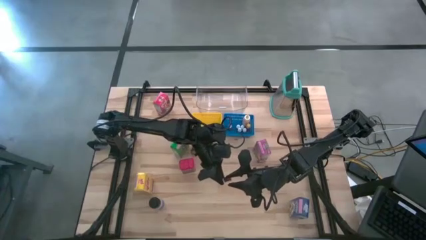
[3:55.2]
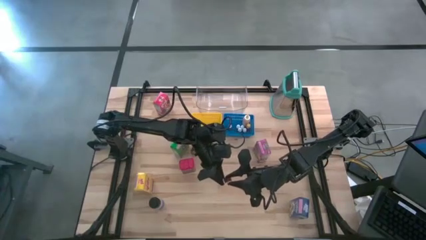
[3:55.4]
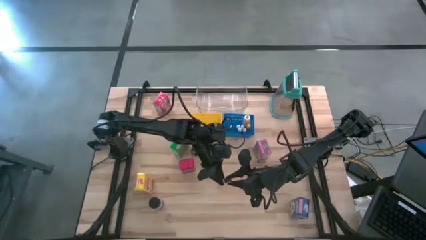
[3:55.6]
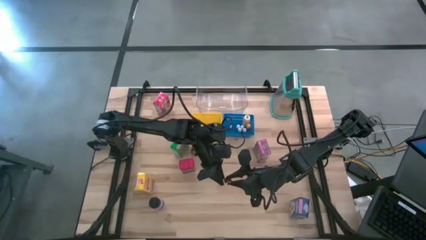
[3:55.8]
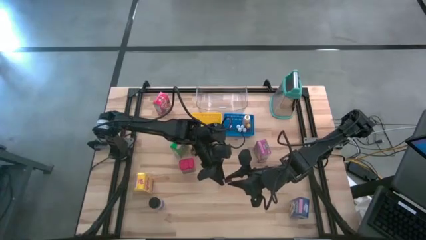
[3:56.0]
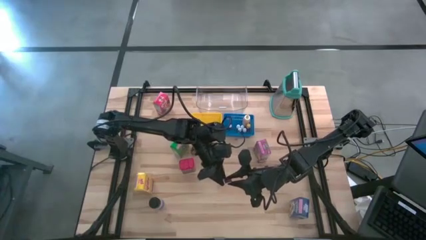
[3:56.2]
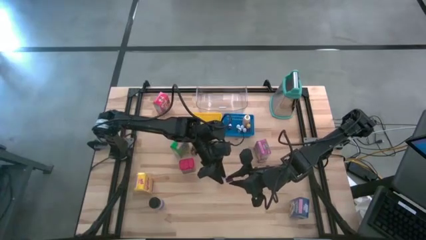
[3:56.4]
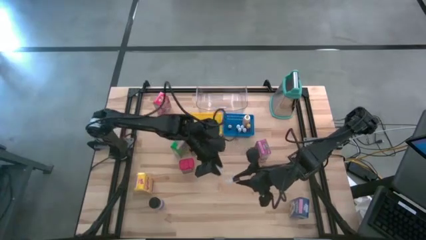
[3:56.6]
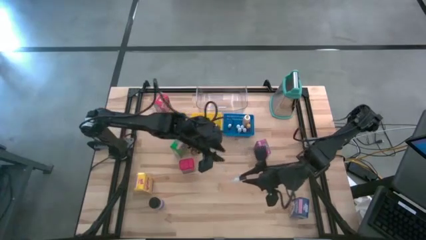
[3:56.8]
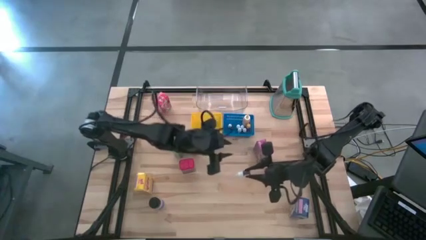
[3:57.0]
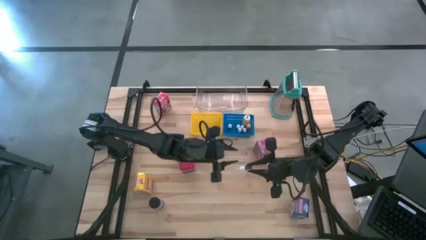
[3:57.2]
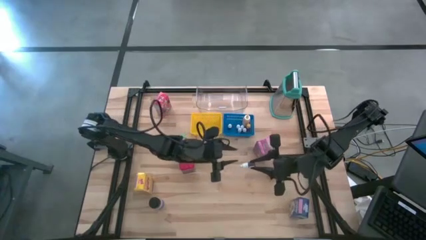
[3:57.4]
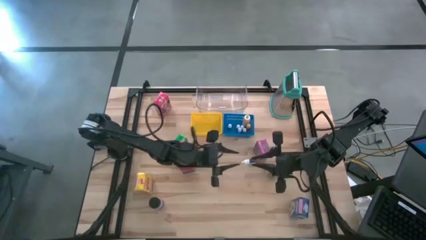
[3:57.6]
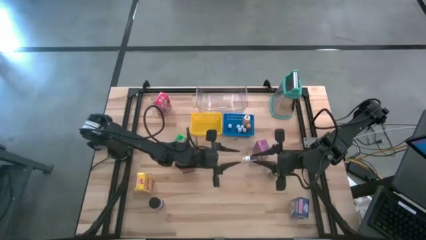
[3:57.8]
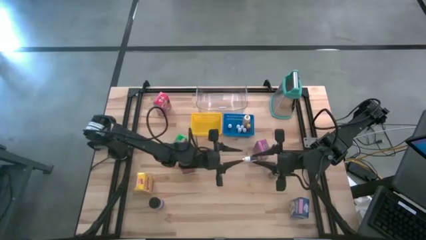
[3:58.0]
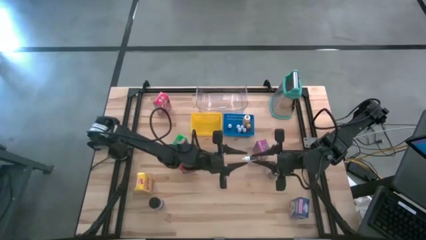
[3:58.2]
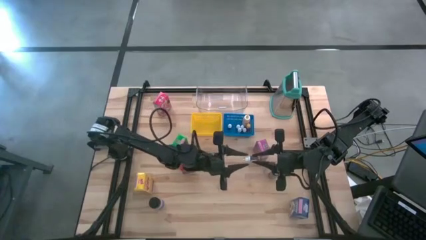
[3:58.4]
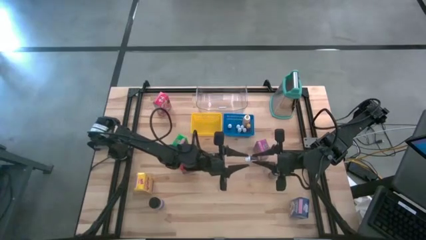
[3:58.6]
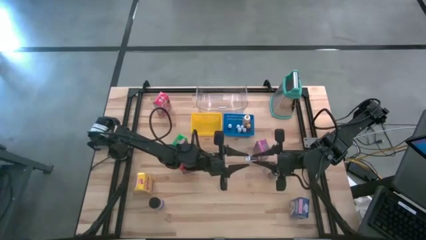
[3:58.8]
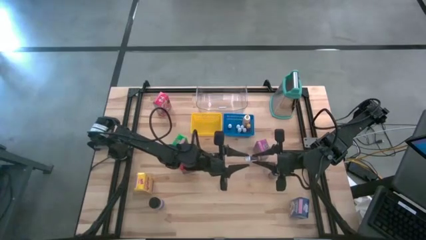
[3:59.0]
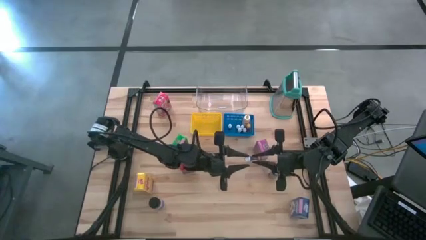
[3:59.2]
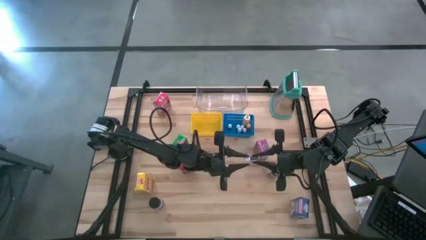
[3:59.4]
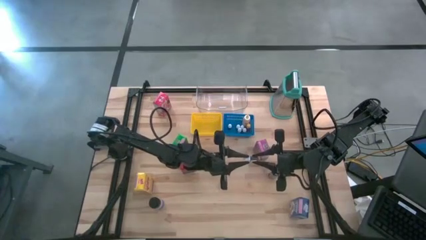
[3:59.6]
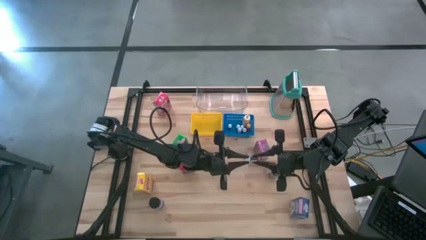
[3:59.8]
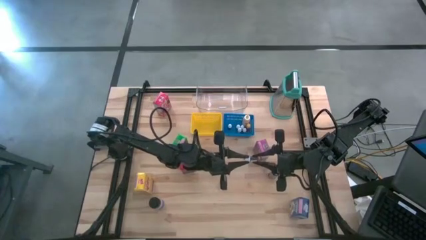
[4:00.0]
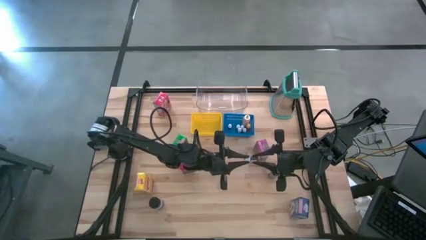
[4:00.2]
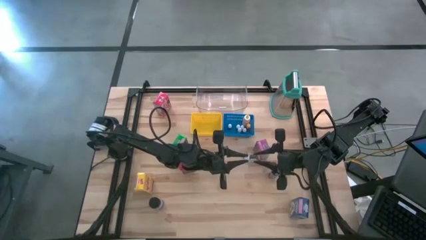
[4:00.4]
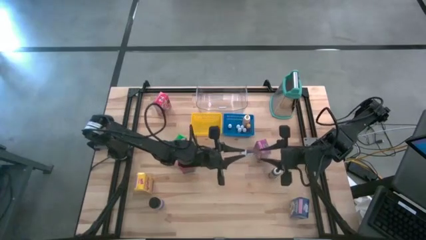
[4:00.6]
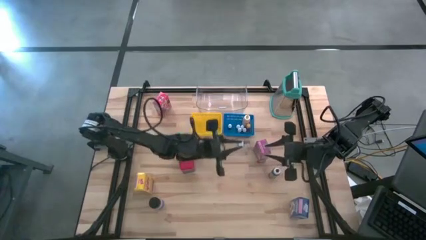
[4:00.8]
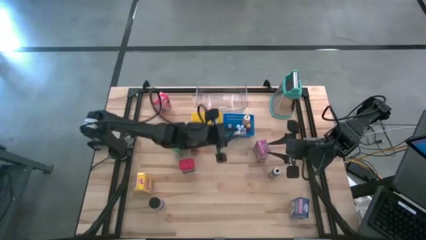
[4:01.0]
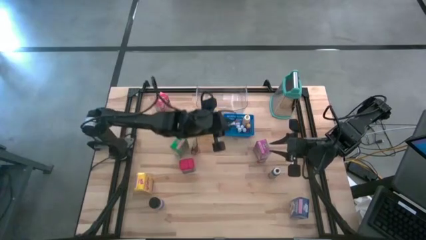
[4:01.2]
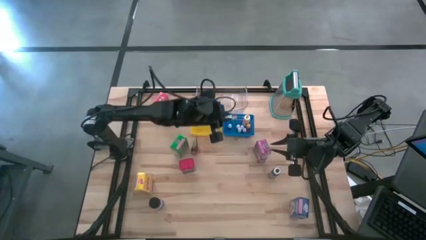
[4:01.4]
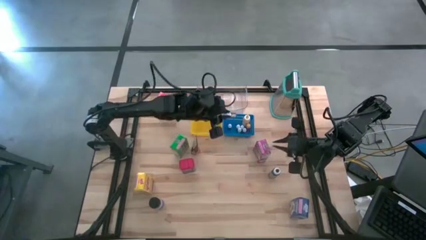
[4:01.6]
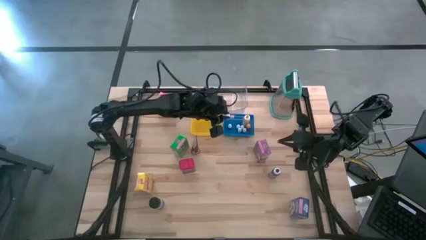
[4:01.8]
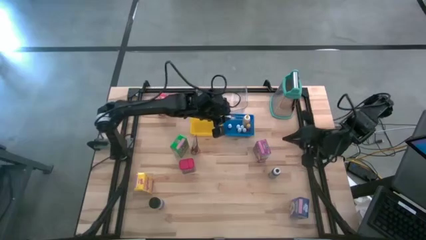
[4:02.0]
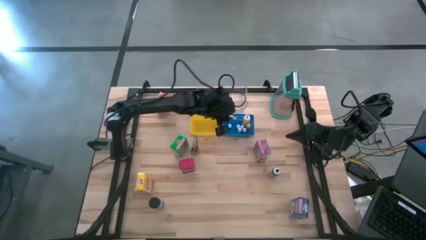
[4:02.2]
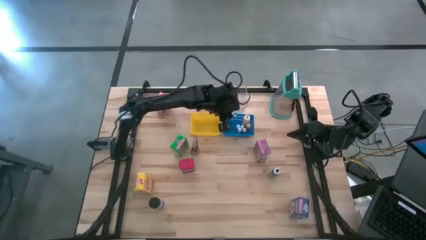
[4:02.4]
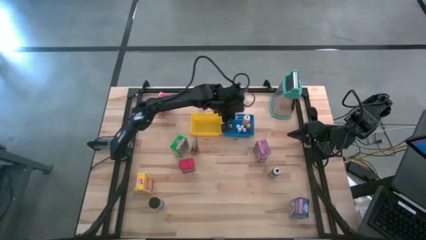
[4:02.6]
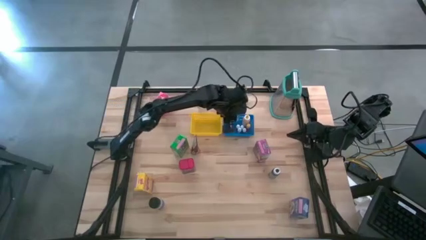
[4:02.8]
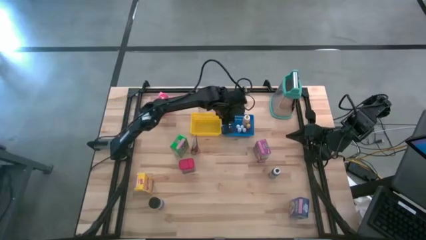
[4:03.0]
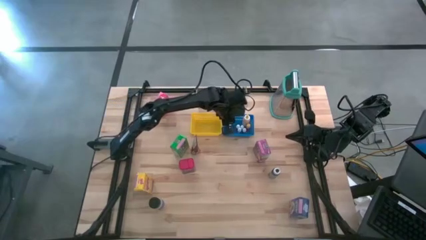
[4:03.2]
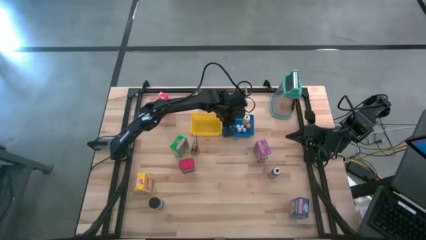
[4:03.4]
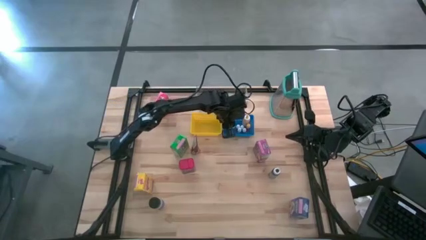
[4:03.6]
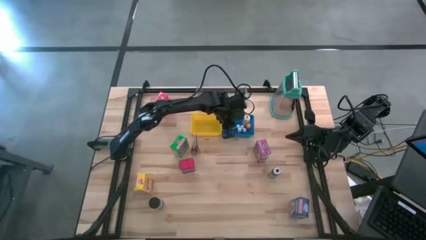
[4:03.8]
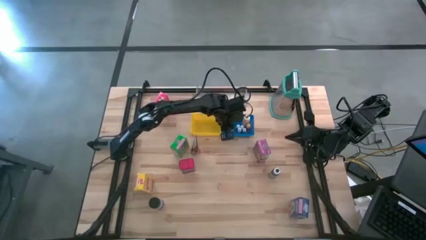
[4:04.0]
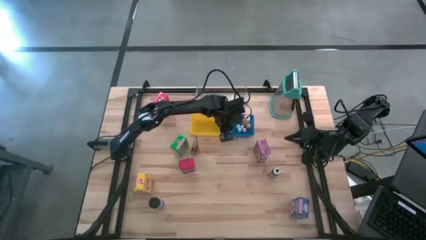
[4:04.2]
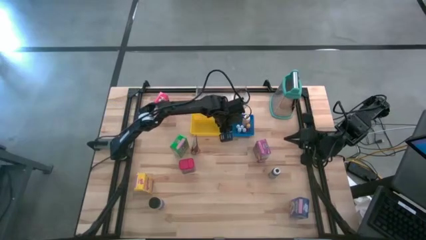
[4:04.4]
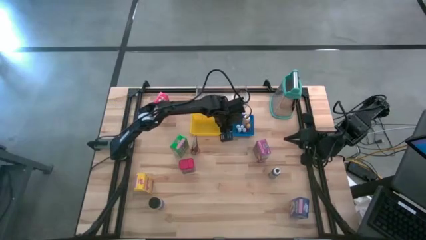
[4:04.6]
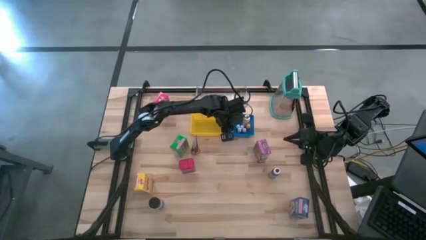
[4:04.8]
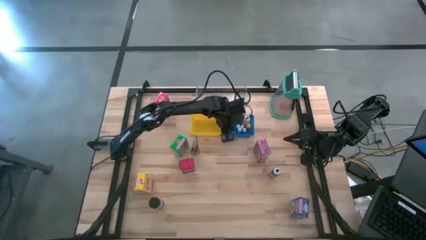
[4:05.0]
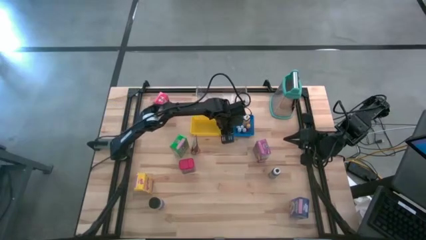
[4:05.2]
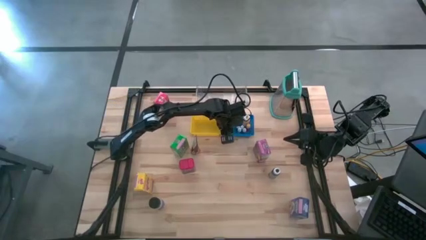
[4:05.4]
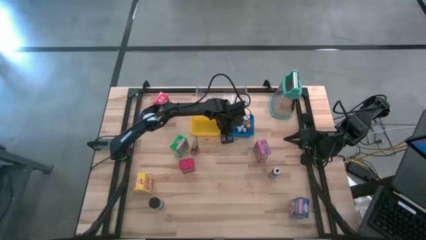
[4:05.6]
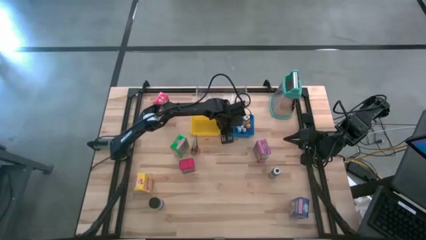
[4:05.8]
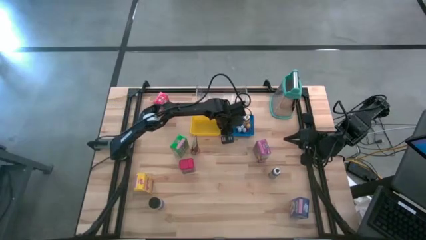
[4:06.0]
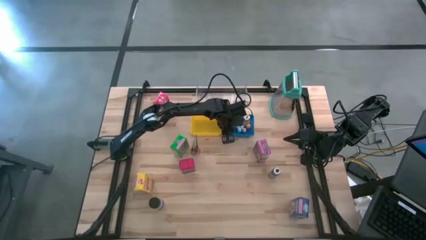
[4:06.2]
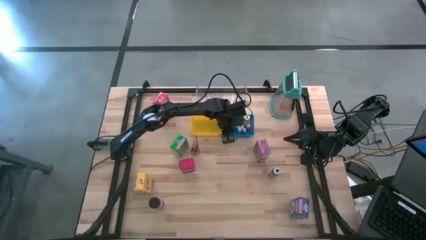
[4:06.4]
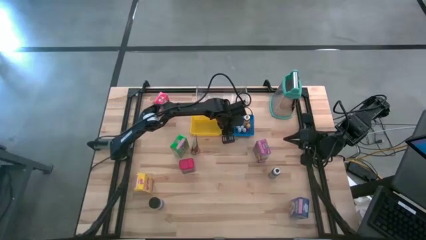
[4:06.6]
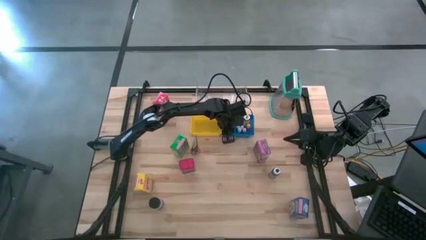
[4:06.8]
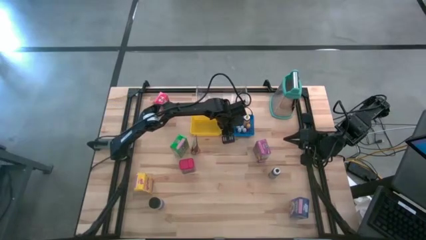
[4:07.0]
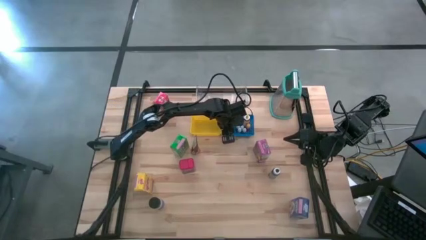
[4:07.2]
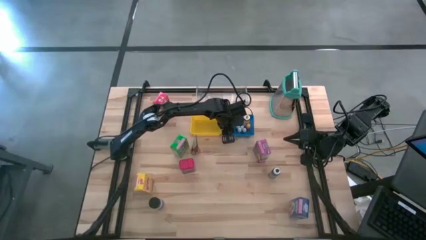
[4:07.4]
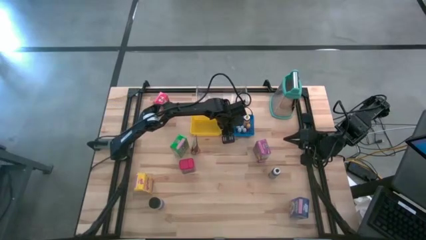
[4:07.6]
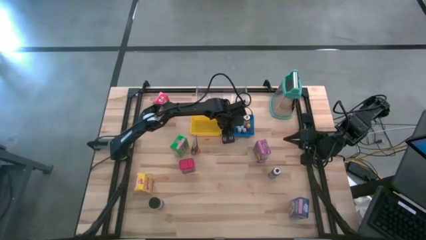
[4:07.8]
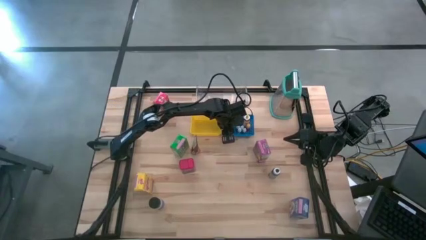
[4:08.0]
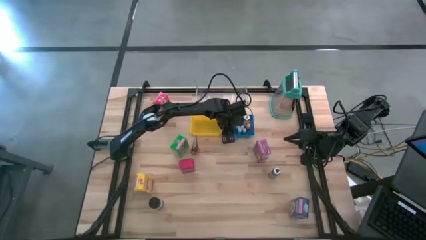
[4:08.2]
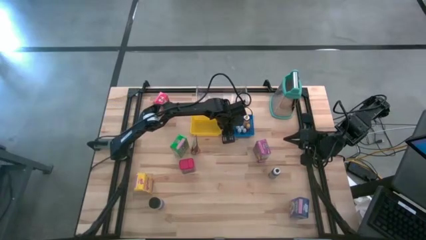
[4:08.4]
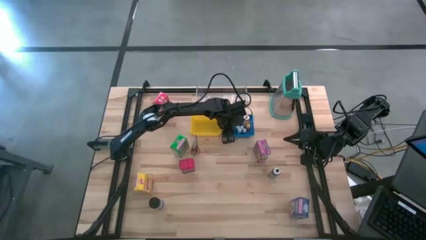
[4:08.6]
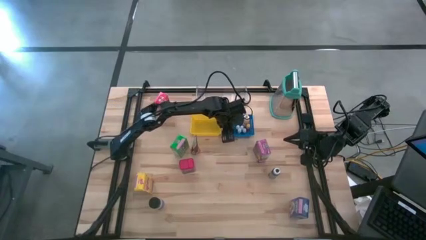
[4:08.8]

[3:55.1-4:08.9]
Task: Pick & Place Kitchen Items
Put the orange food coloring bottle into the blue bin
